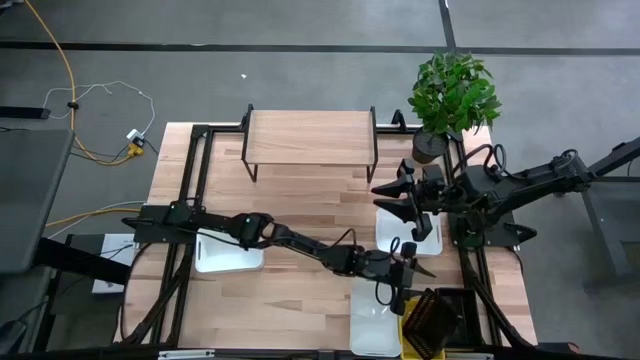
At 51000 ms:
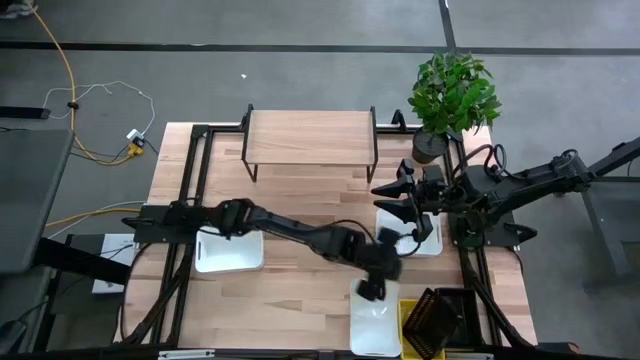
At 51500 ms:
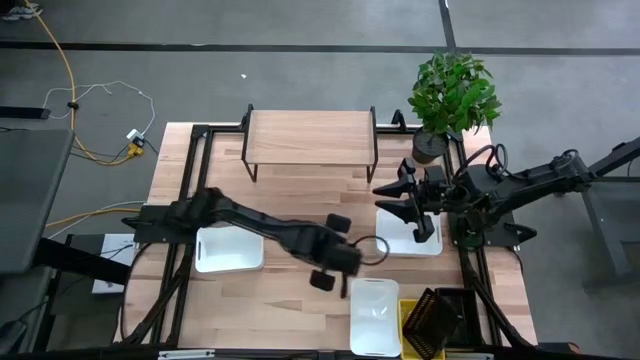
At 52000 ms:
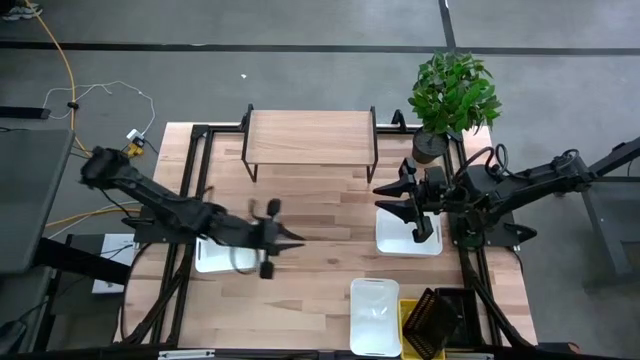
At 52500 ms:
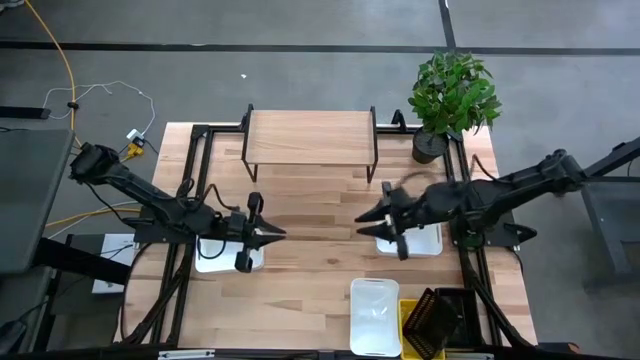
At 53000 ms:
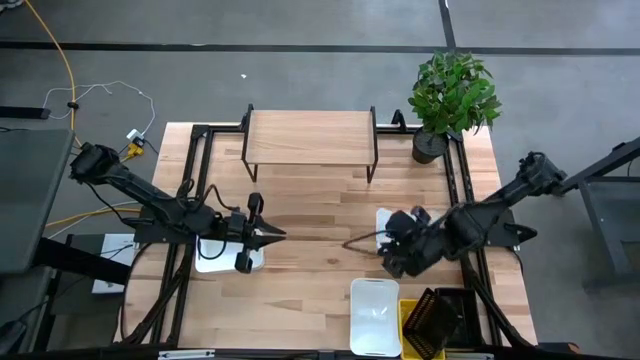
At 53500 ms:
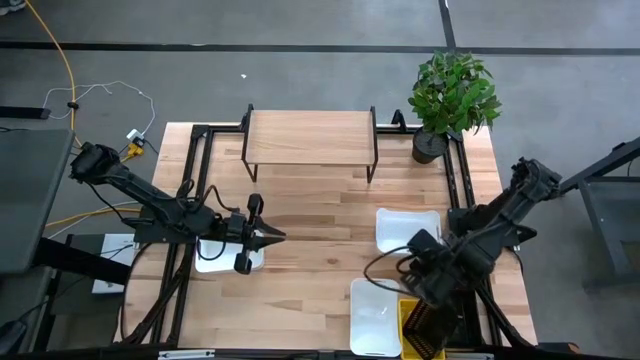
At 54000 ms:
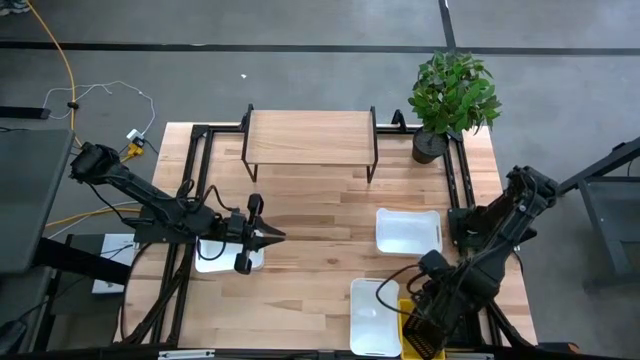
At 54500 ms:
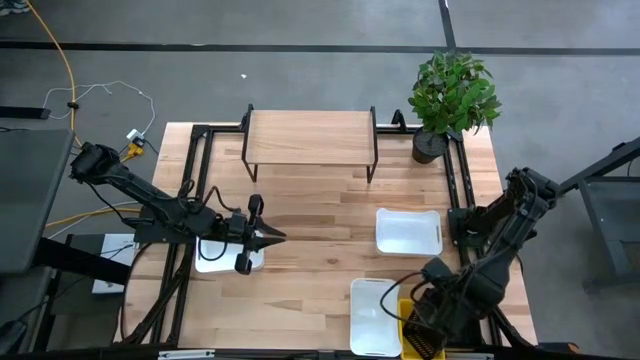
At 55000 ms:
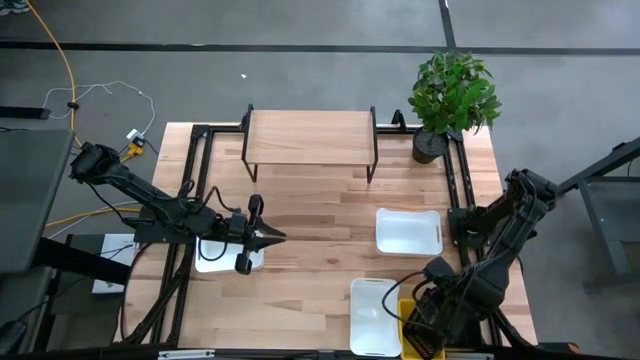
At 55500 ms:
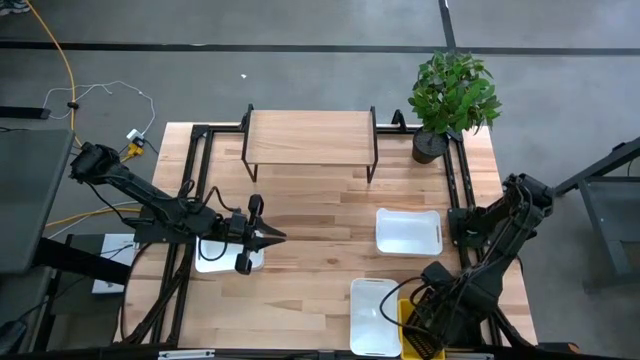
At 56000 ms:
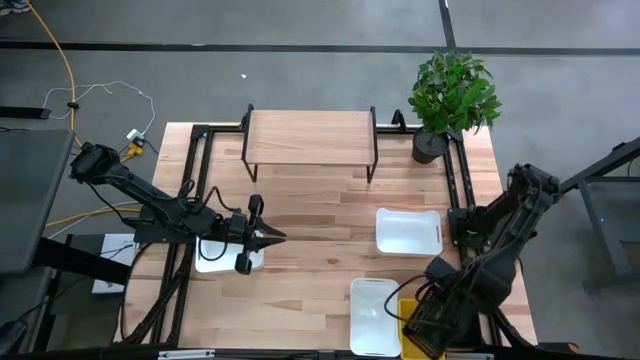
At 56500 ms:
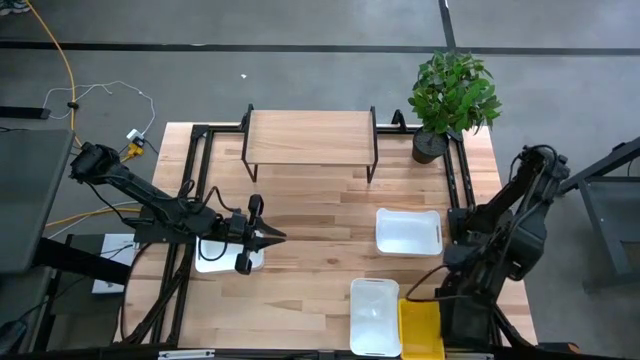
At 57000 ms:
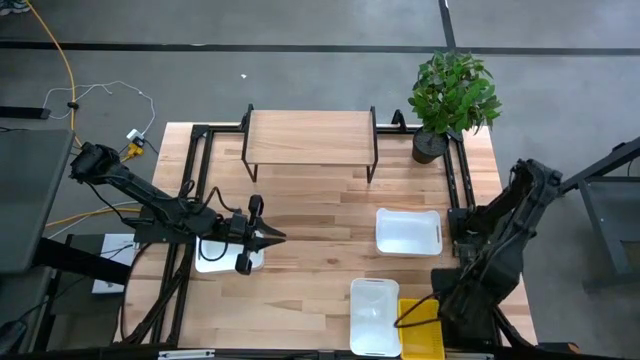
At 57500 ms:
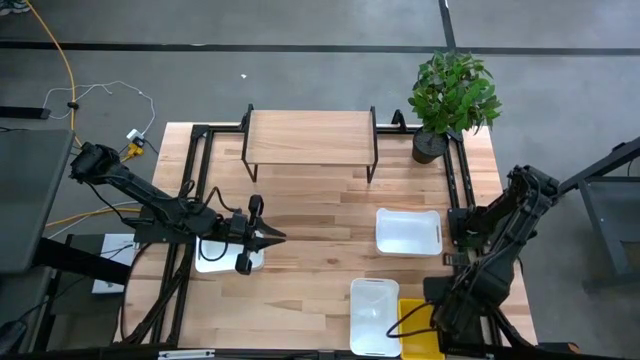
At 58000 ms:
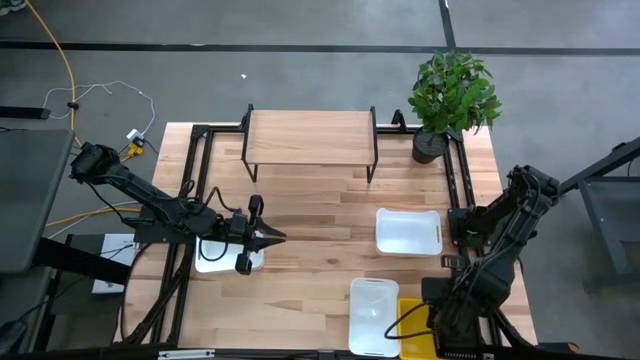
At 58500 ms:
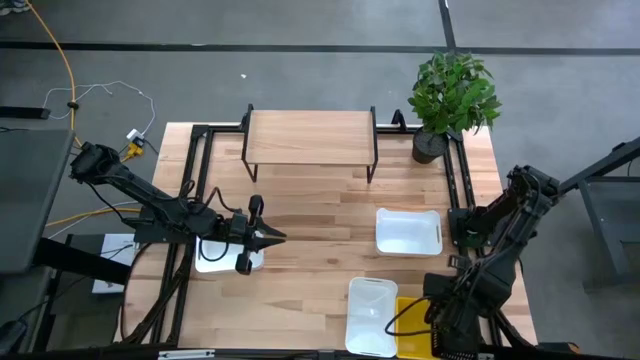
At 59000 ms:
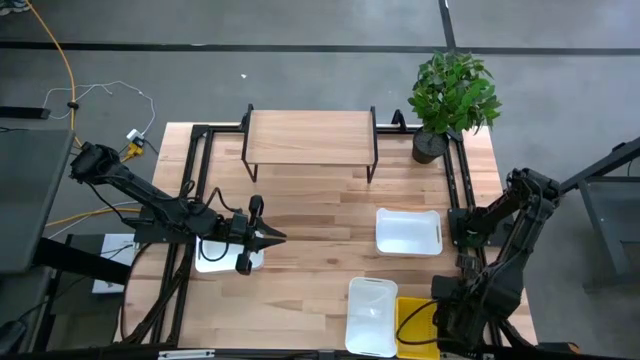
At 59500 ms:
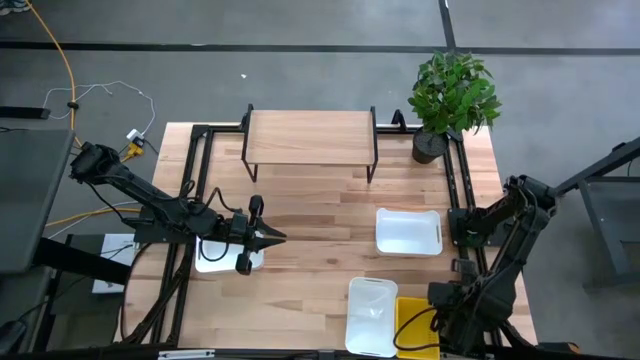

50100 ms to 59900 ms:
Task: Stack baskets on shelf by color
Stack the left black bin on the stacked black bins

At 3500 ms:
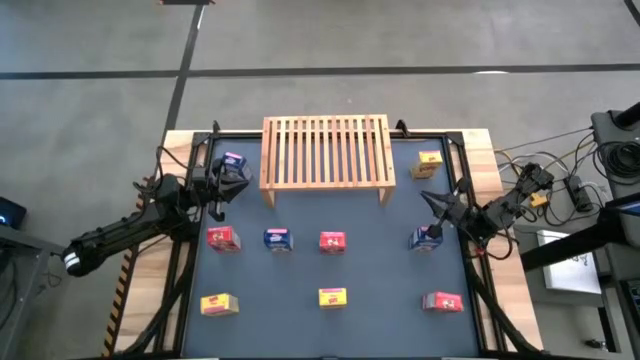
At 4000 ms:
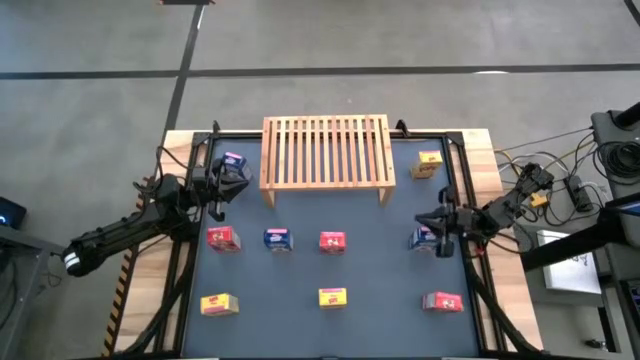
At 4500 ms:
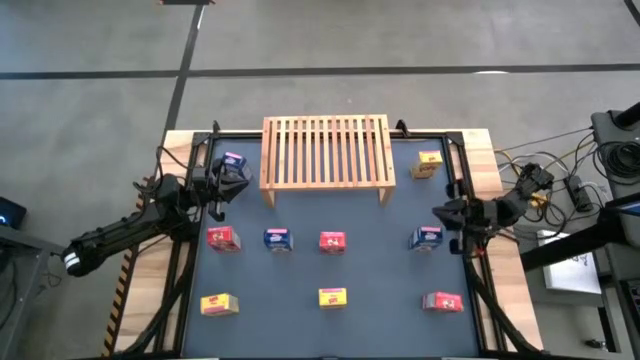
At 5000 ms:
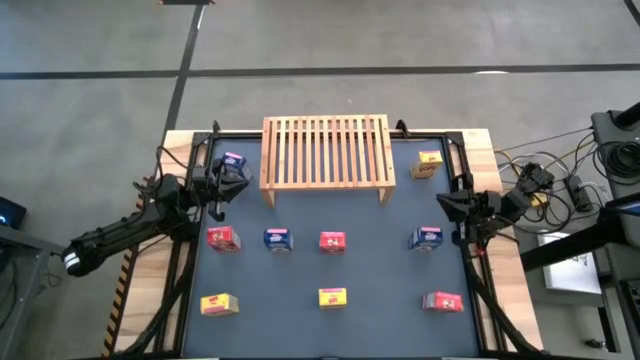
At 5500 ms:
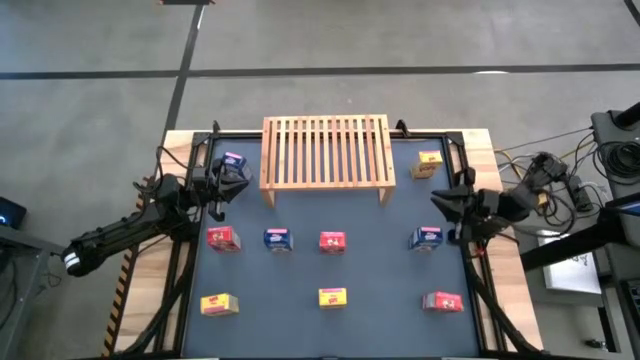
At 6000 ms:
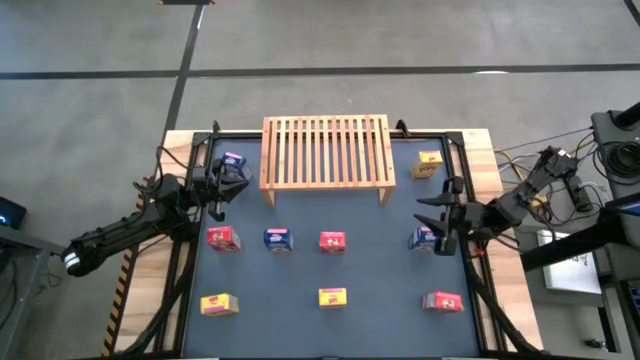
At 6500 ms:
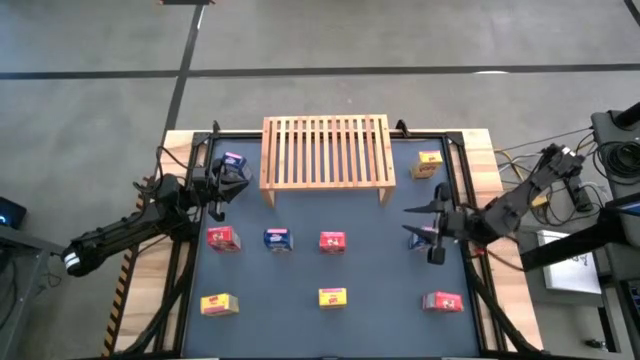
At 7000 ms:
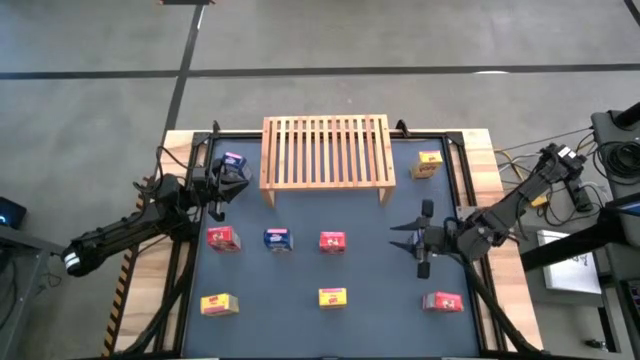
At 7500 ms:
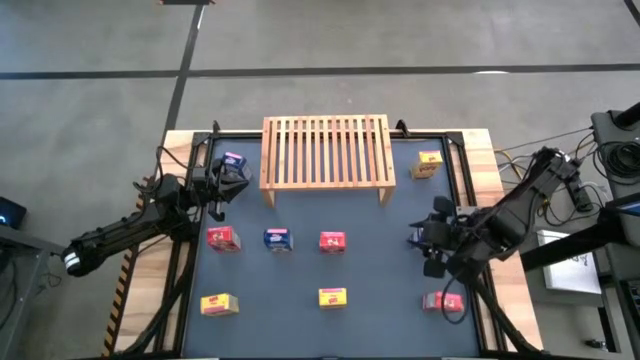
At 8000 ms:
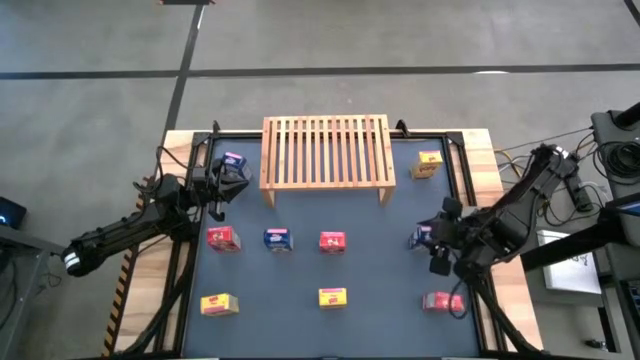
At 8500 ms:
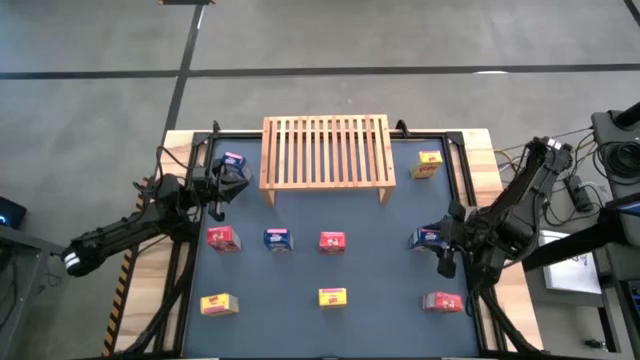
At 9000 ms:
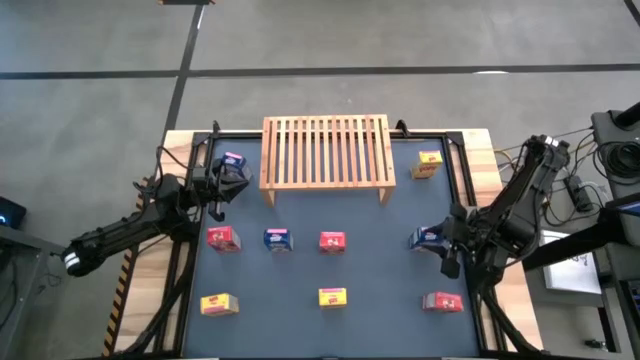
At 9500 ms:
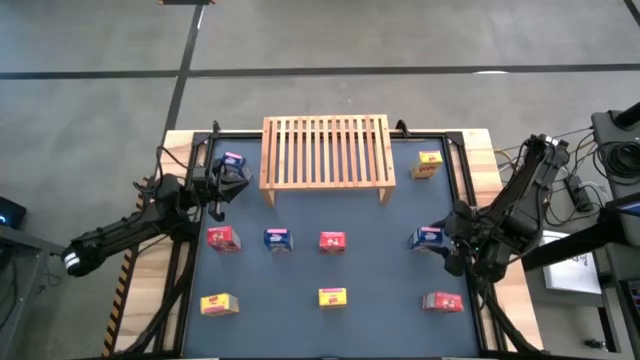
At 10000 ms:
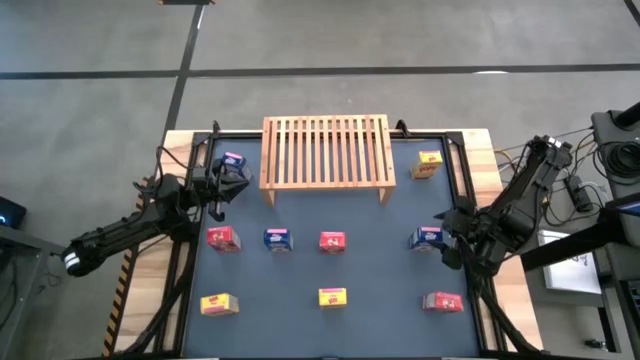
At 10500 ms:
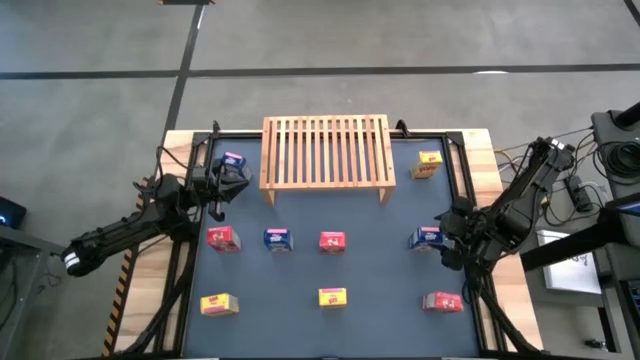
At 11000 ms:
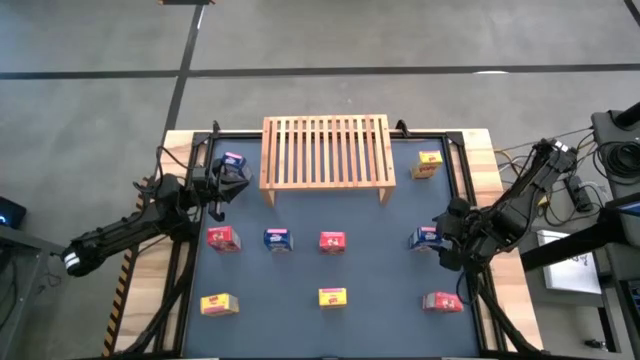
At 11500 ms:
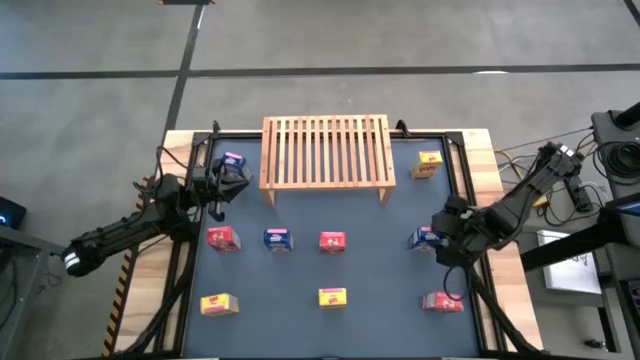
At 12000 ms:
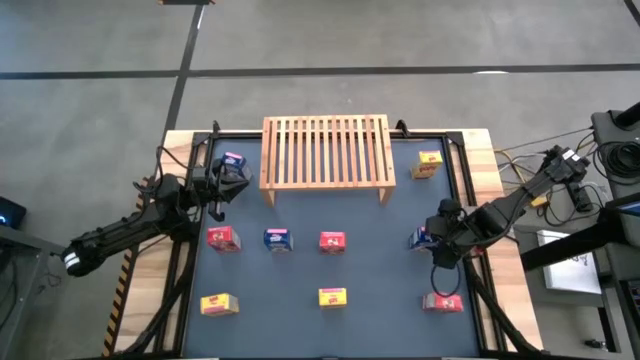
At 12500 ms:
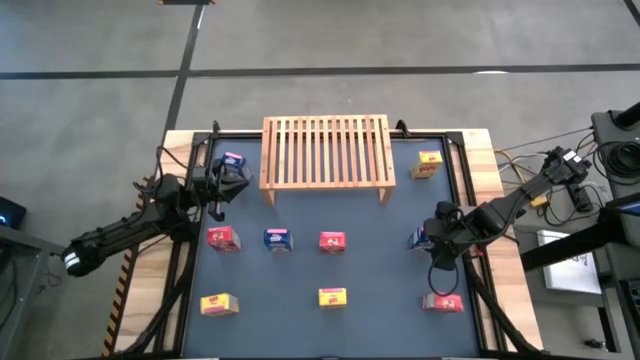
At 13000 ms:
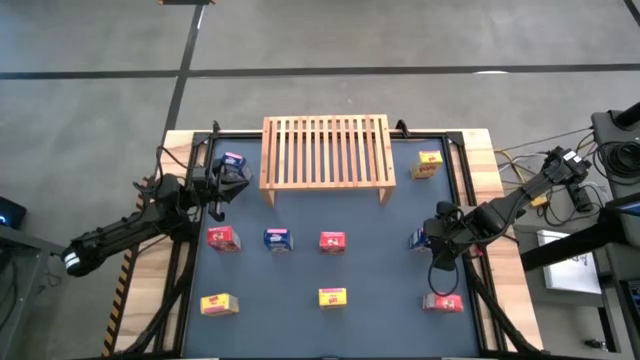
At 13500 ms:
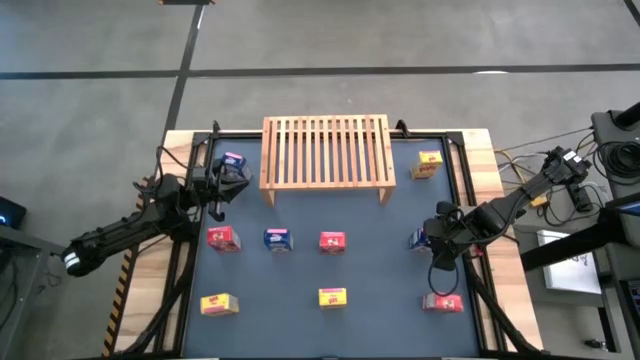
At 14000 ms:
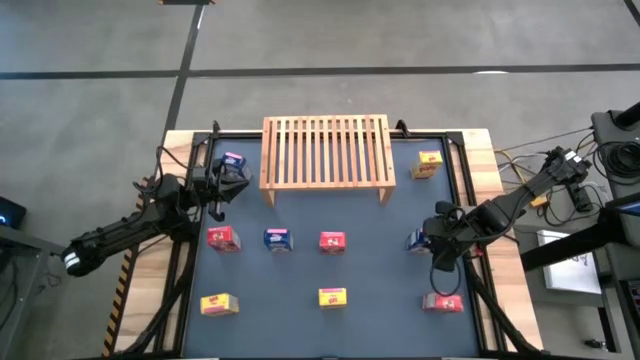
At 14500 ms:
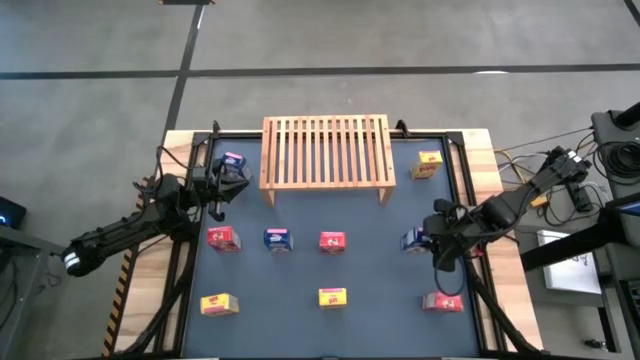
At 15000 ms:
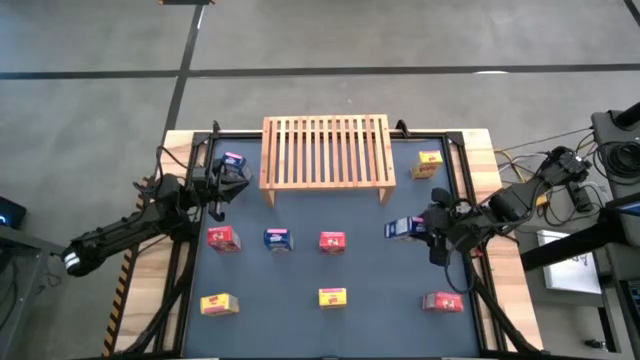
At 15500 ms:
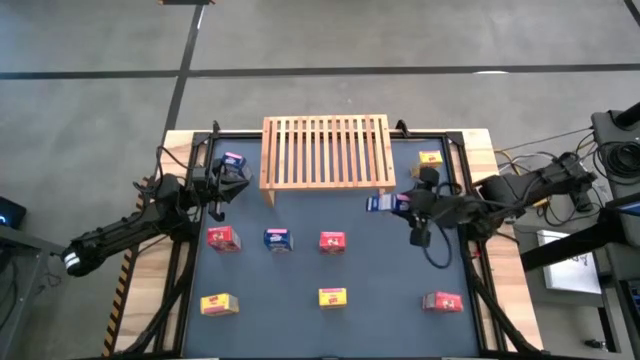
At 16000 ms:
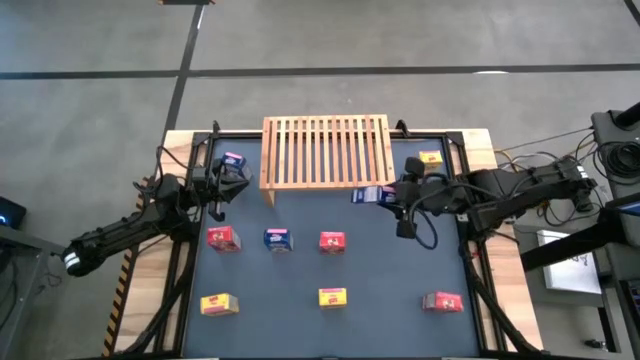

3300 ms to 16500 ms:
Task: Stack cereal on shelf
Put the bottom right blue cereal box on the shelf
